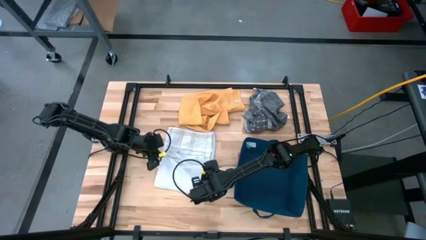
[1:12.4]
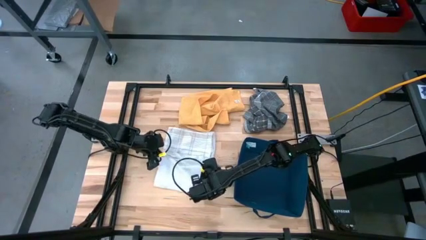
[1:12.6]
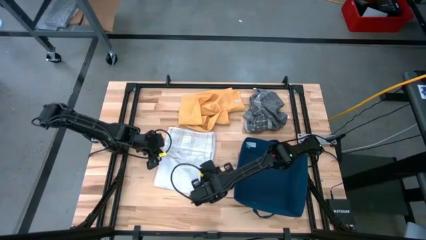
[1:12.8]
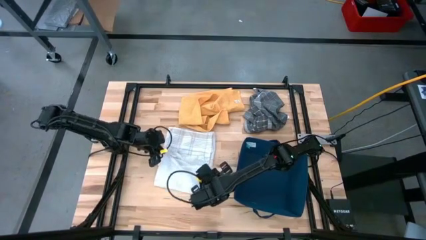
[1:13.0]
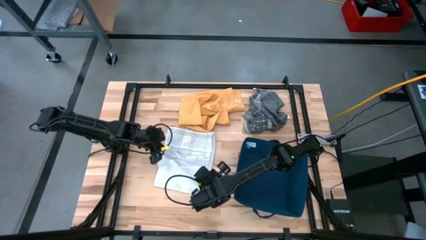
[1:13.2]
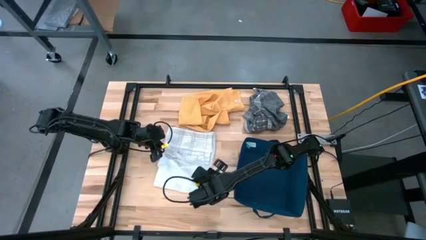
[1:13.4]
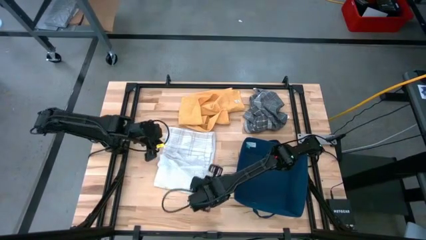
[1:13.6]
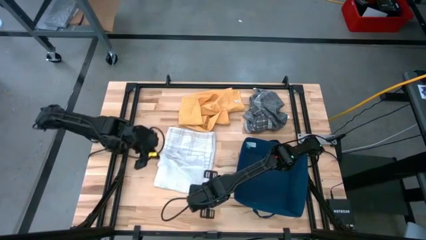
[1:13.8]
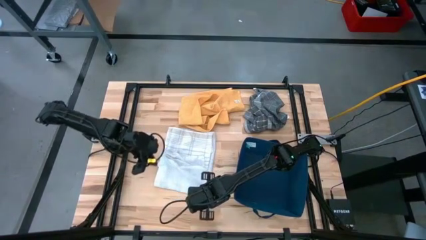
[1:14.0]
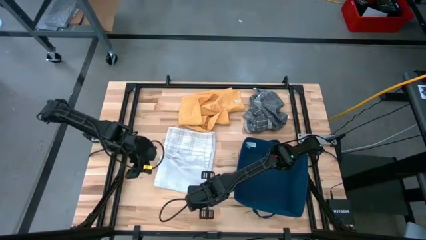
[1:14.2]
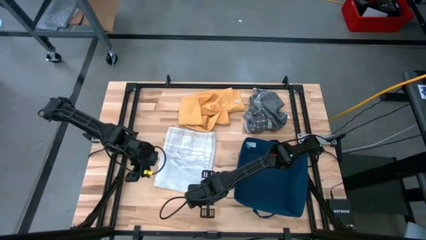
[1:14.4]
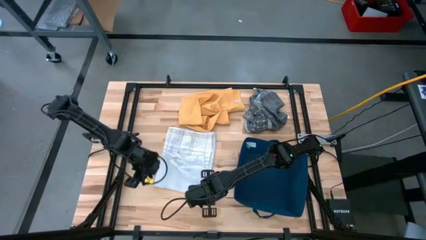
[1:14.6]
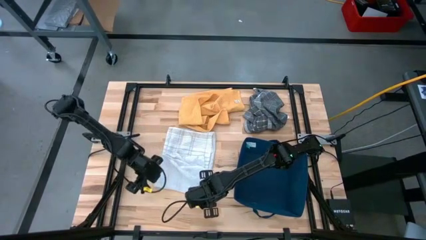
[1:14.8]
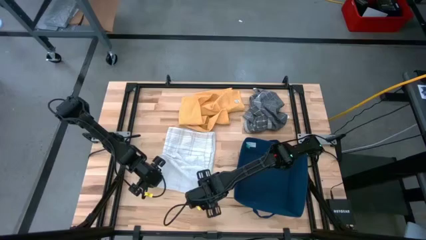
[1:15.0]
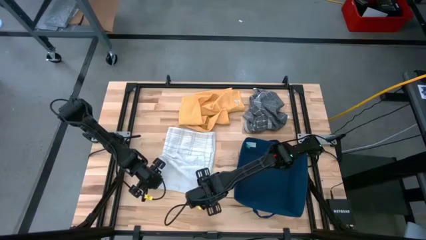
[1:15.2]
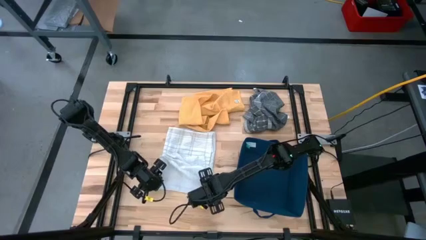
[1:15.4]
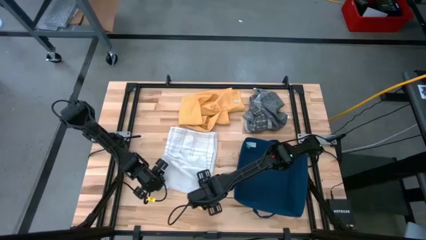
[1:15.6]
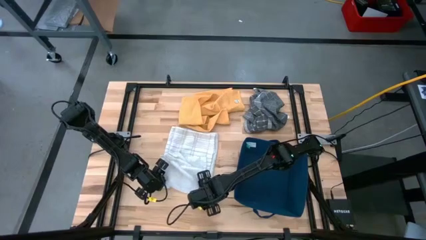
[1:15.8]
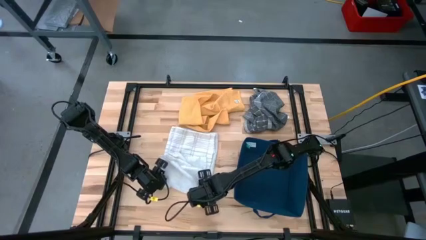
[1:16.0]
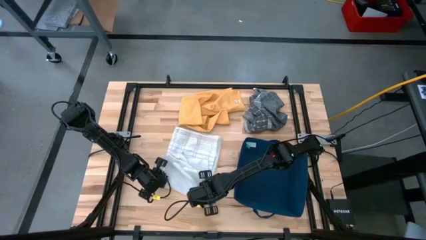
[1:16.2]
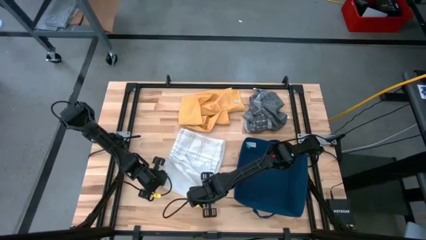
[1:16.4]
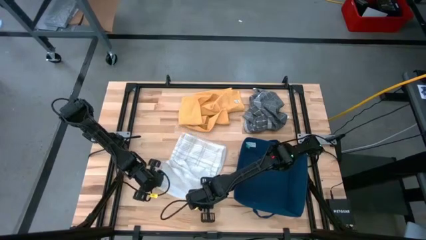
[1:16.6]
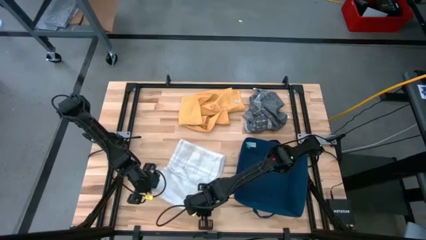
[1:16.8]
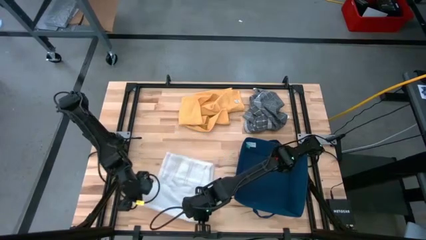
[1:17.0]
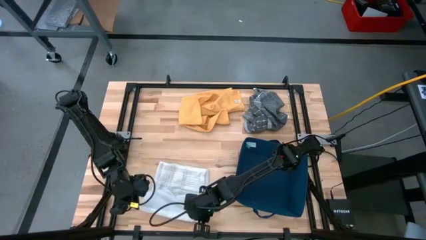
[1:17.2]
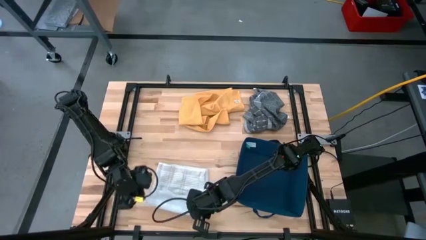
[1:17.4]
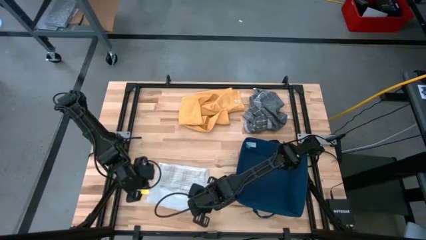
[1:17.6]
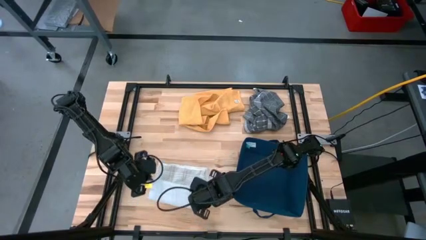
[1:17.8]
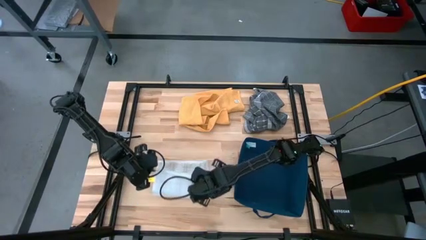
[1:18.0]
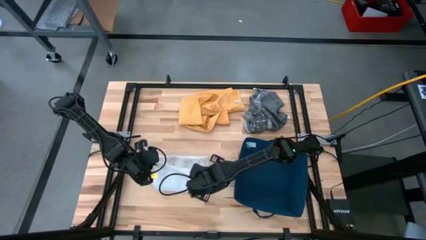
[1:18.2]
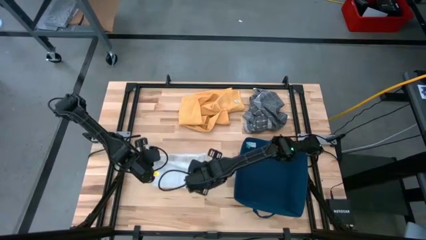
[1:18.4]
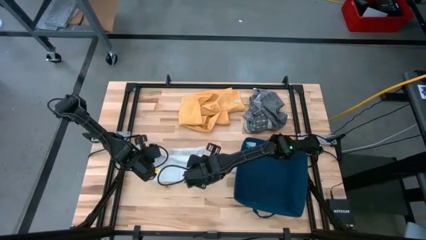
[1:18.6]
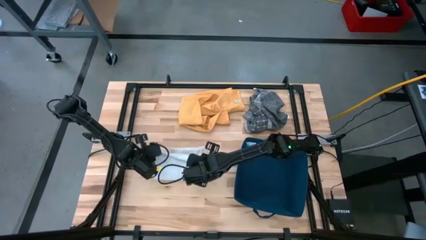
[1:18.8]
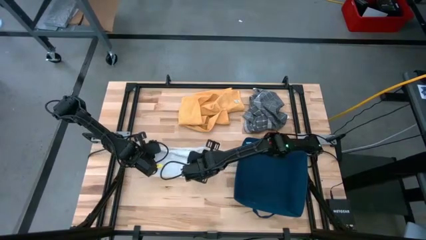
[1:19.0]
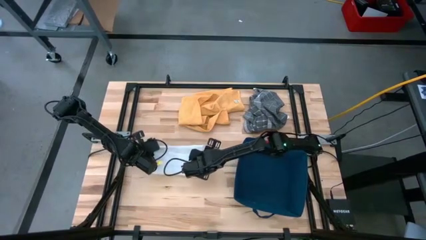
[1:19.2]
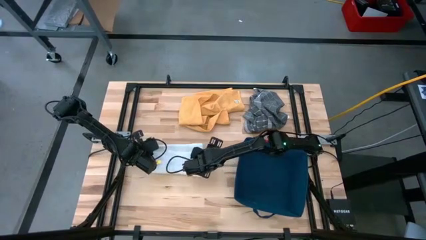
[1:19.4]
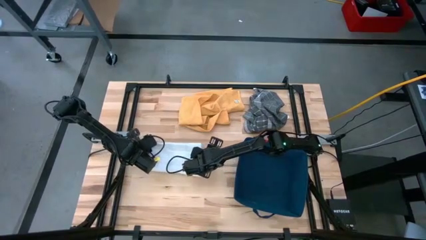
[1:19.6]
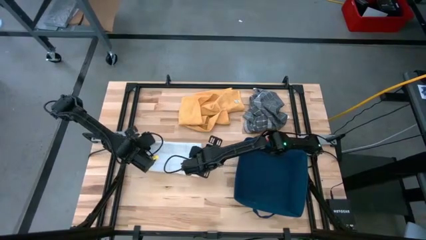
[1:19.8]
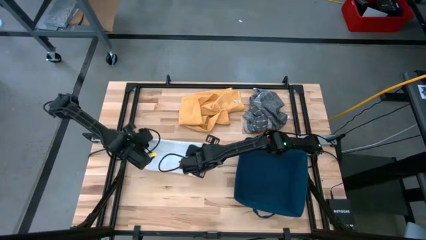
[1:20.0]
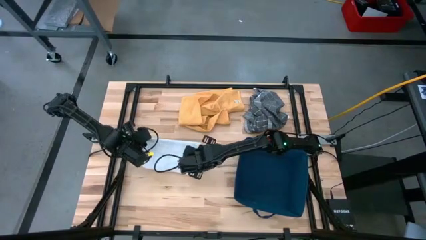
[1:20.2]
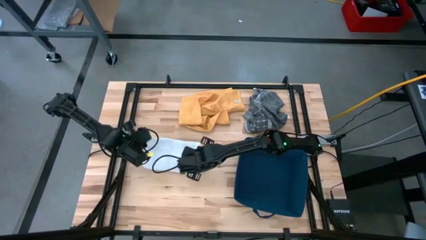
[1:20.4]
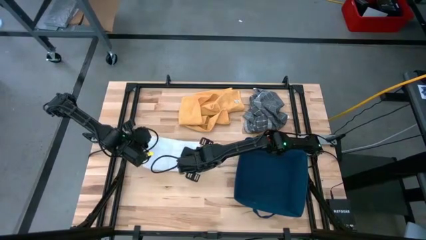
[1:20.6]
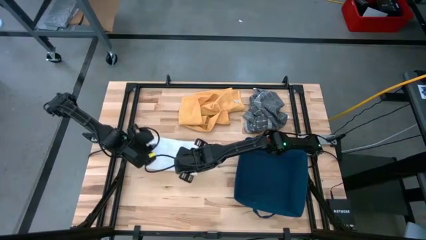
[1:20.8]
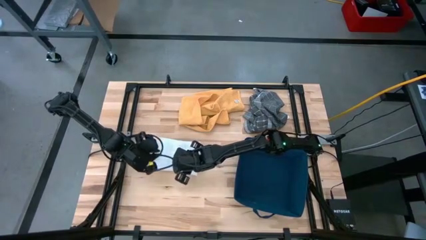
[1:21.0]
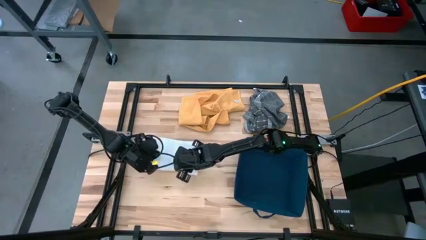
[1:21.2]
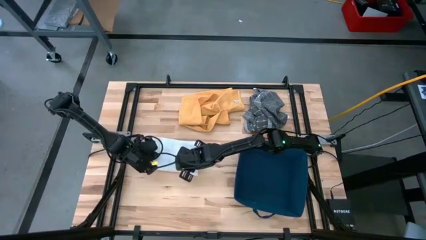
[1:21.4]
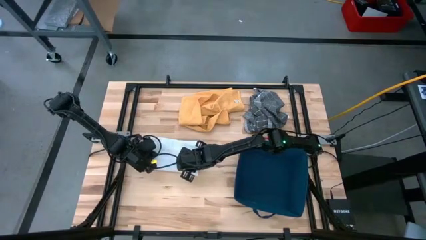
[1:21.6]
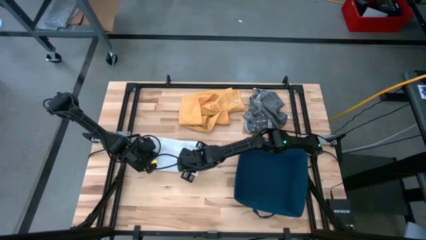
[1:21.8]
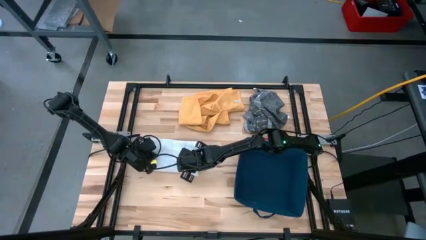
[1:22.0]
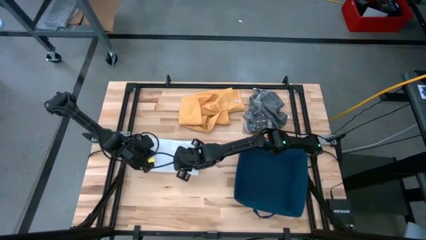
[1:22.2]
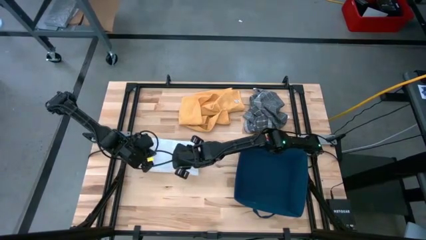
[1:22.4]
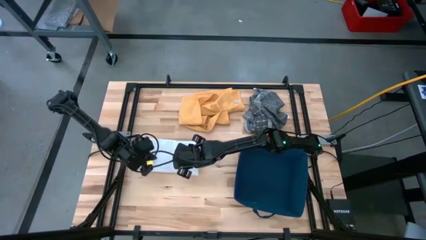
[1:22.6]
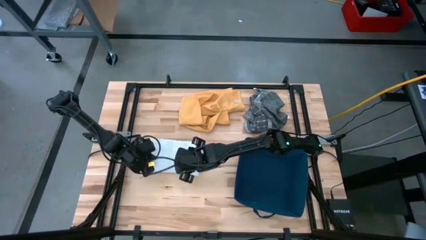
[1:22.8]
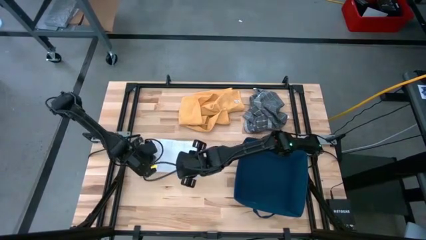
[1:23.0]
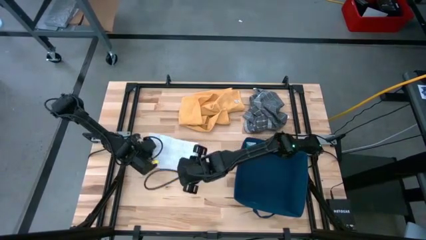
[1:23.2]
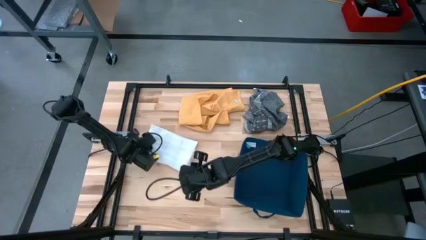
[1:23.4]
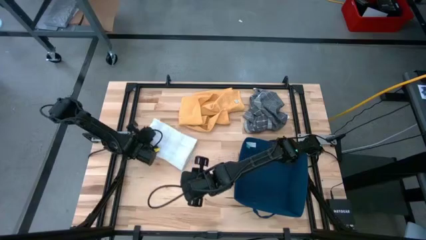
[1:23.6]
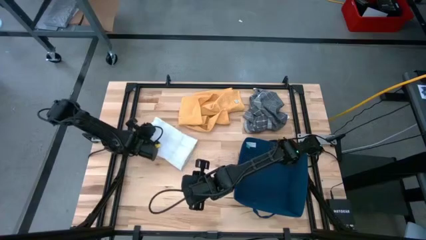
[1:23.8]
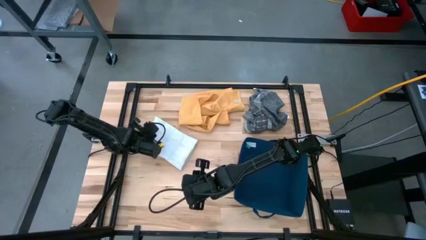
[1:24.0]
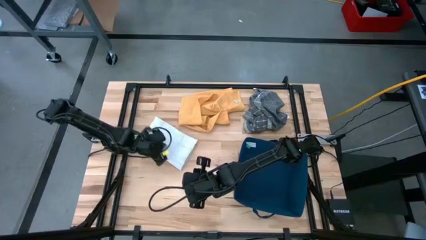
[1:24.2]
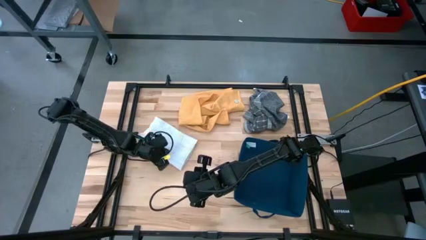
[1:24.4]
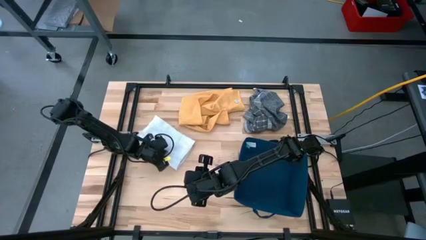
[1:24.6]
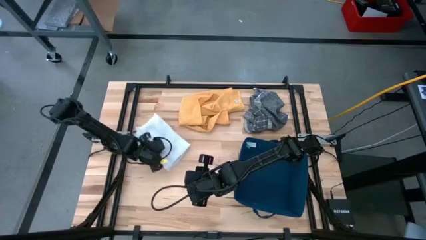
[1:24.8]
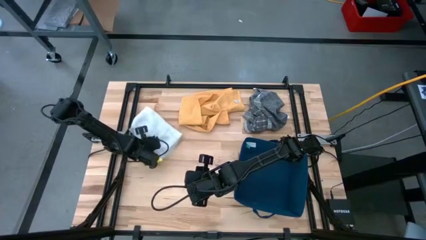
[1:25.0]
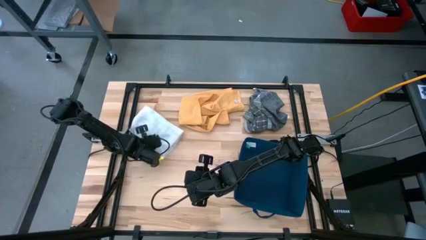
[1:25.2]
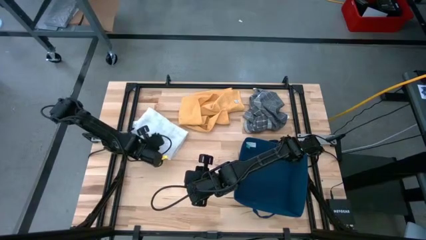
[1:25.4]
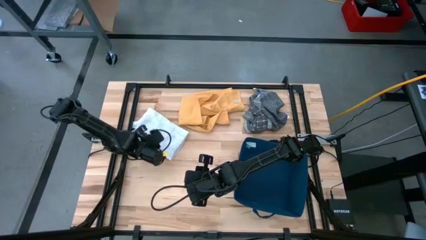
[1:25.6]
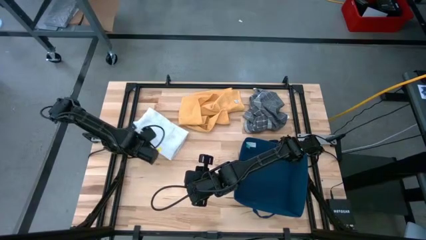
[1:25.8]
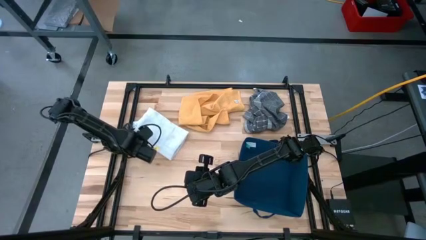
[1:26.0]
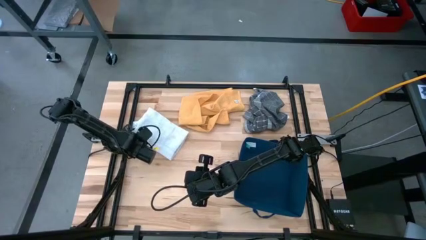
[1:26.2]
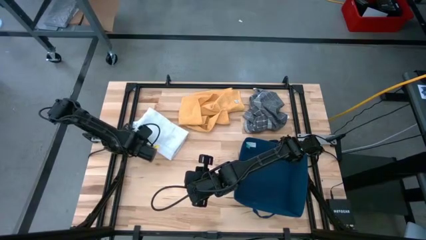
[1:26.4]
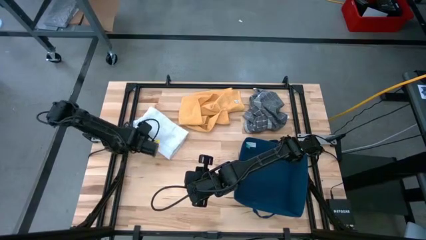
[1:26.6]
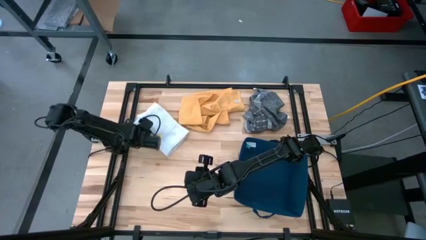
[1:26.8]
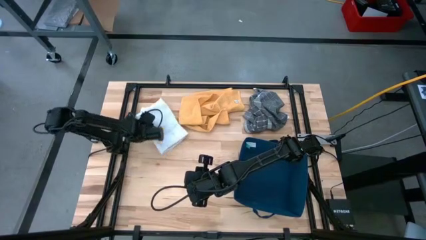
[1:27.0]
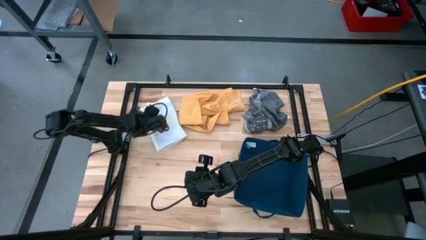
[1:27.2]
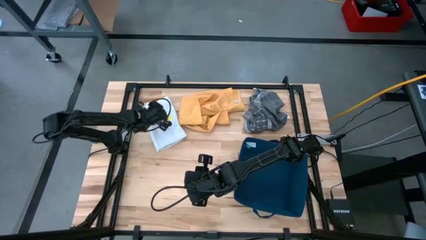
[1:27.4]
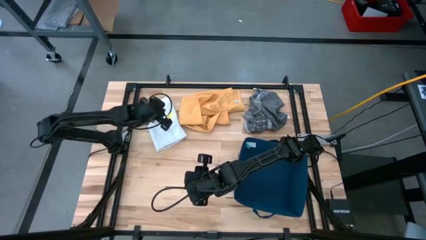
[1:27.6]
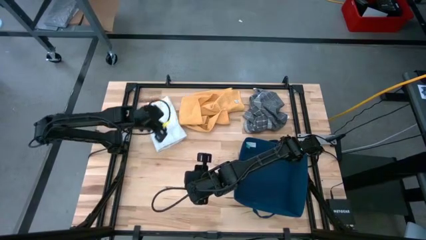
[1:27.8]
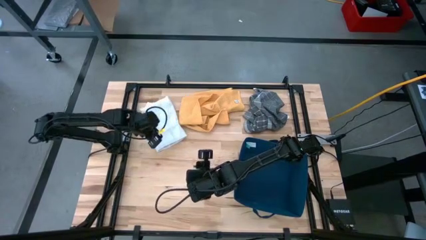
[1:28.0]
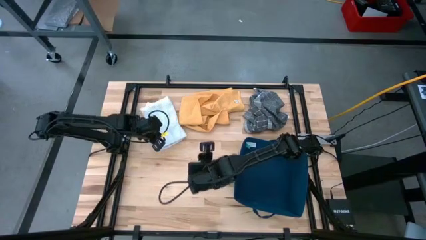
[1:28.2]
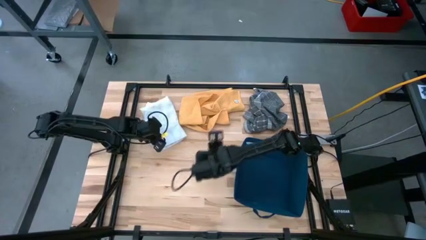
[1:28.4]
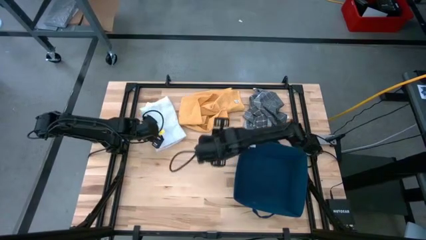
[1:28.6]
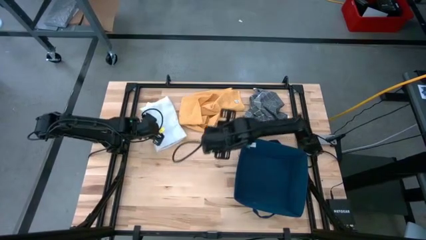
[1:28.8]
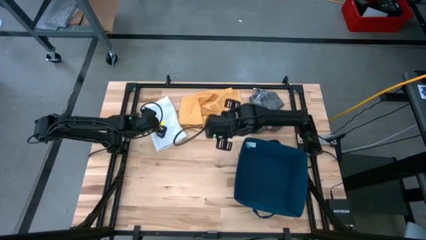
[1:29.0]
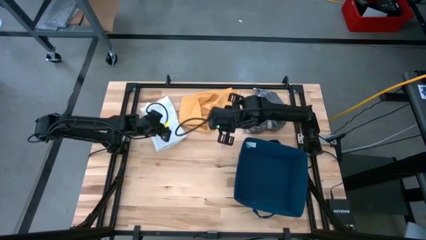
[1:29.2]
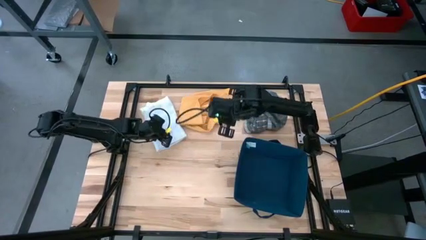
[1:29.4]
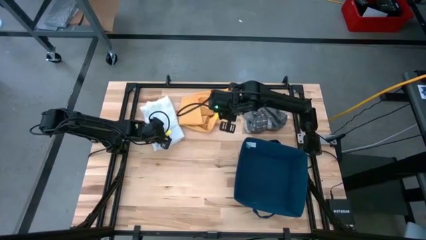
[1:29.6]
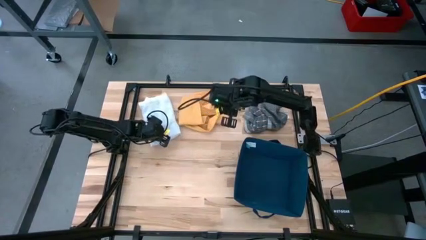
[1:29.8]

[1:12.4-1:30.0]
Task: Fold towel
Fold the white towel
